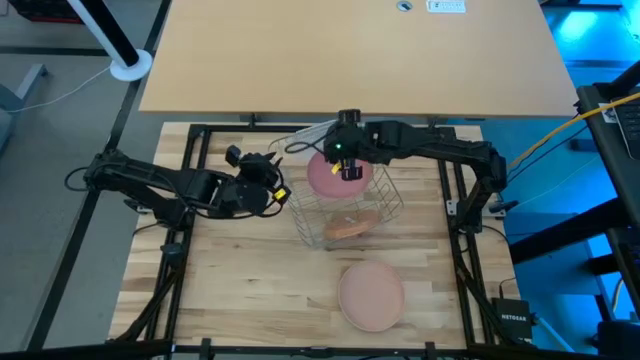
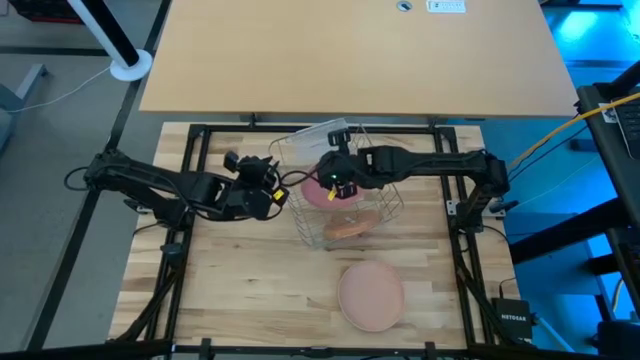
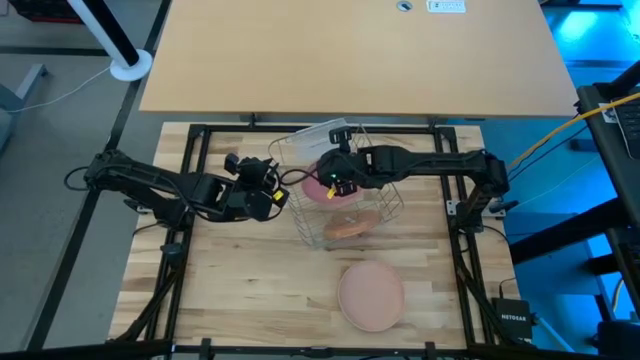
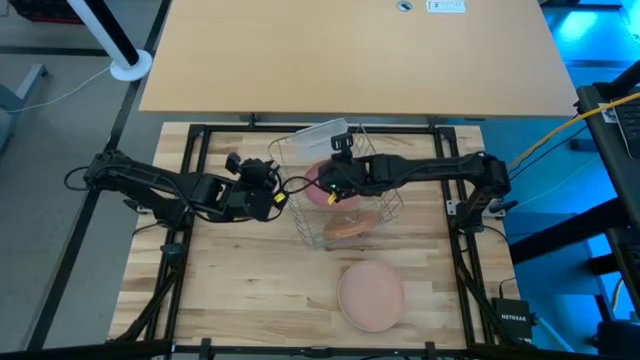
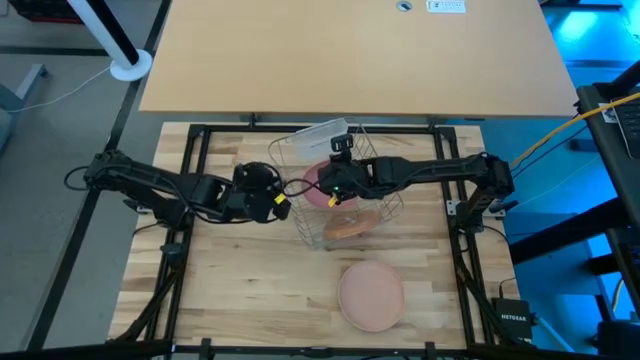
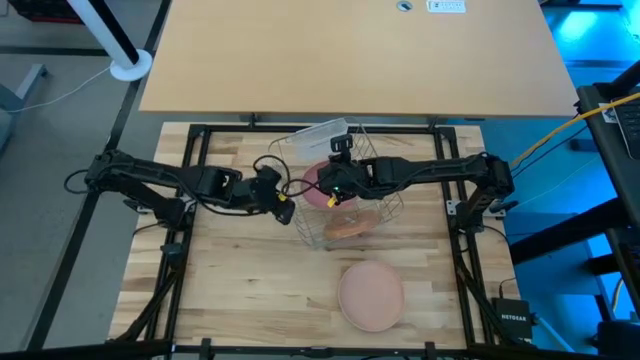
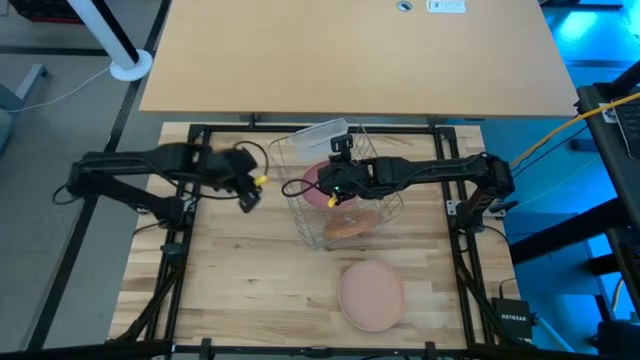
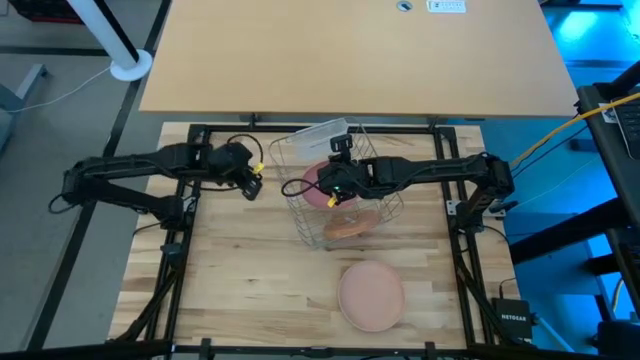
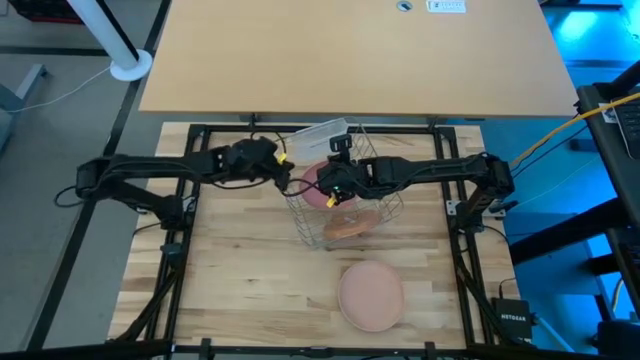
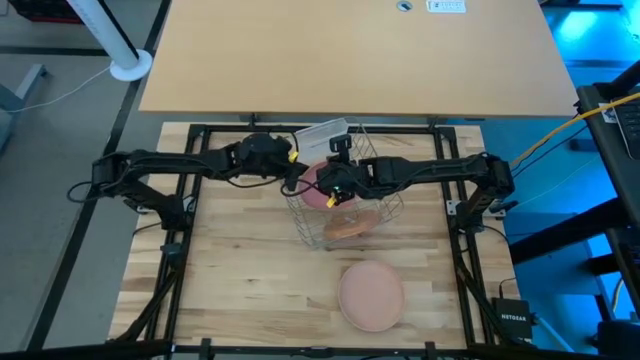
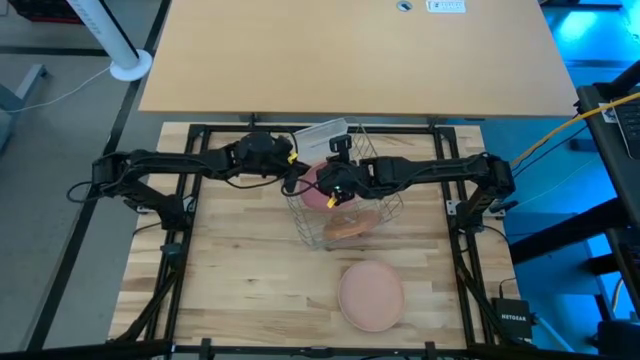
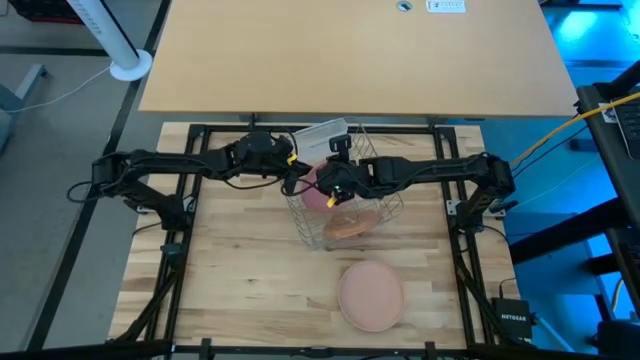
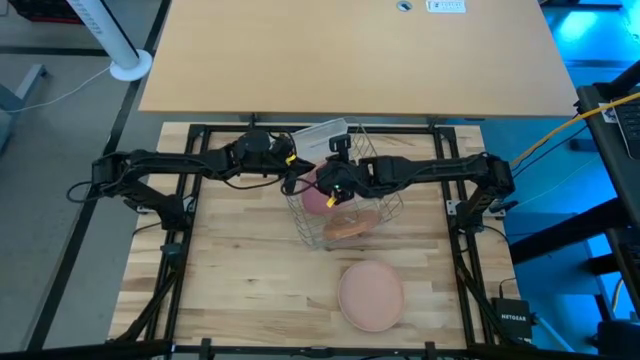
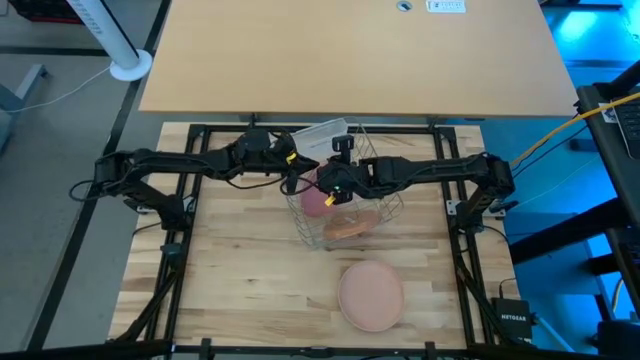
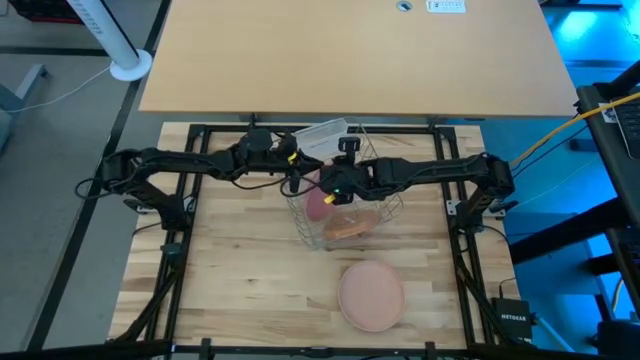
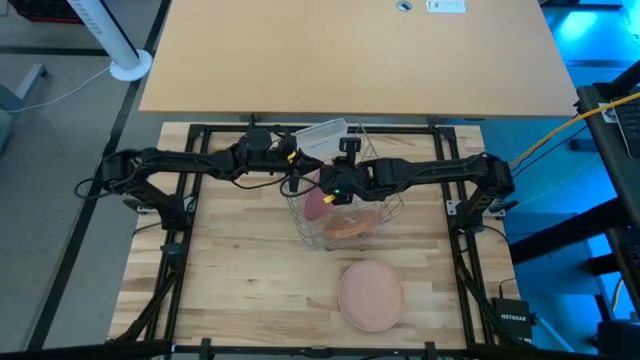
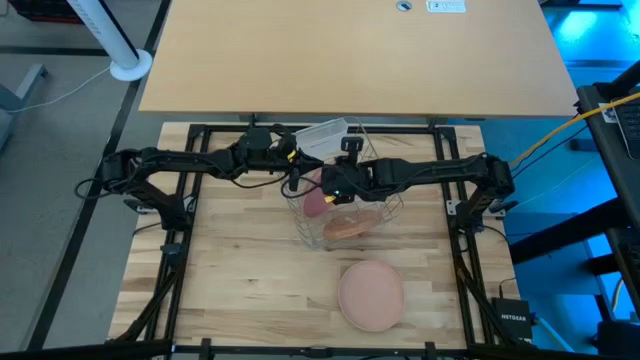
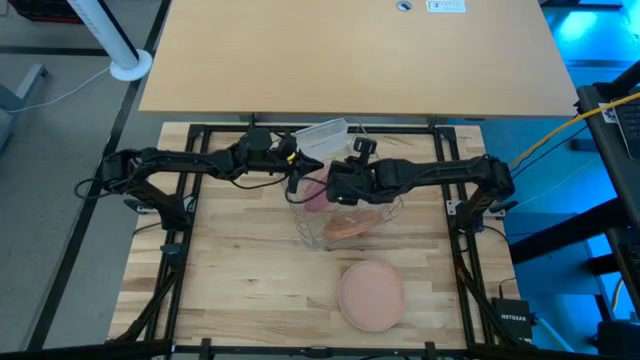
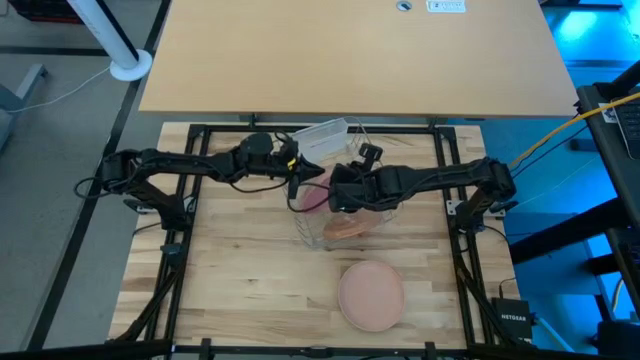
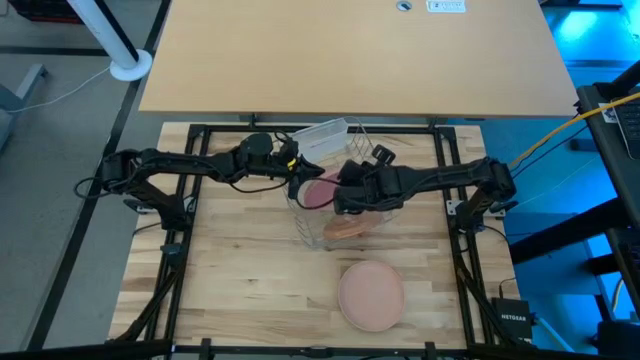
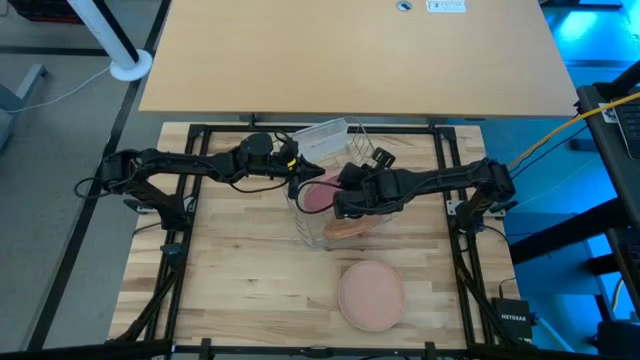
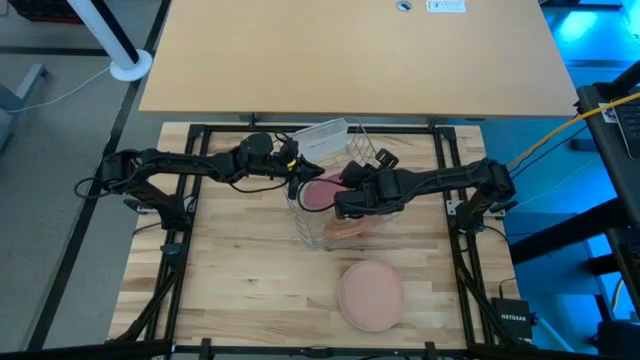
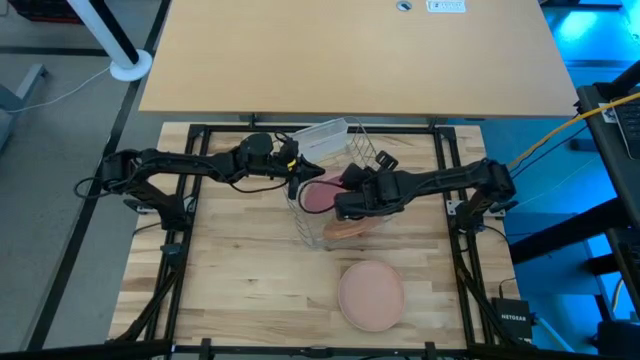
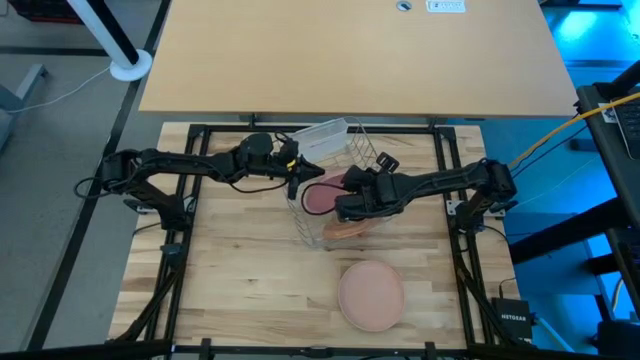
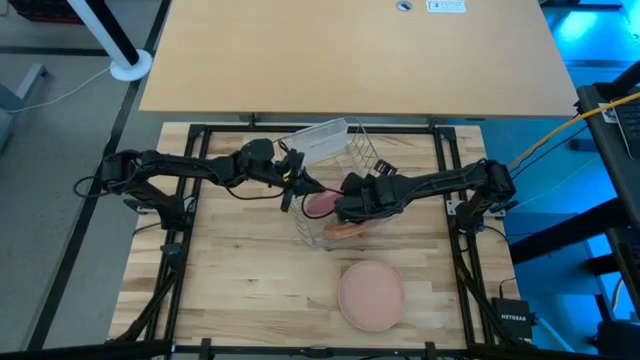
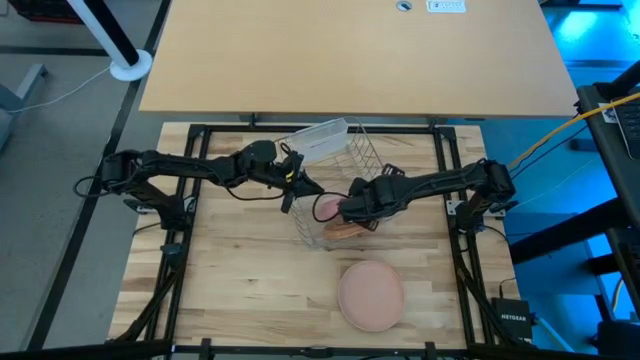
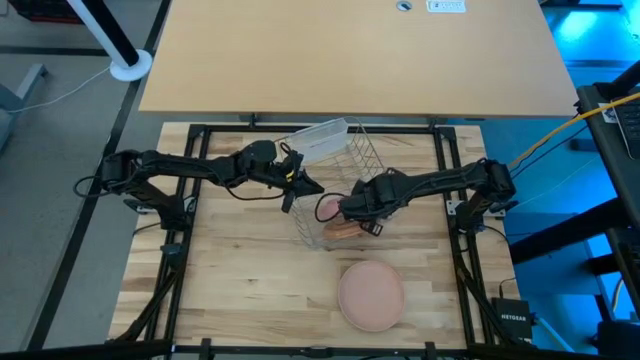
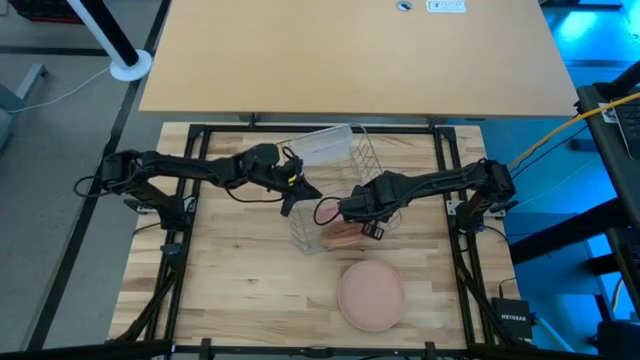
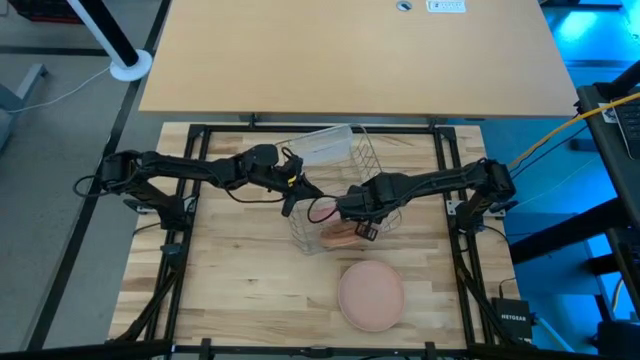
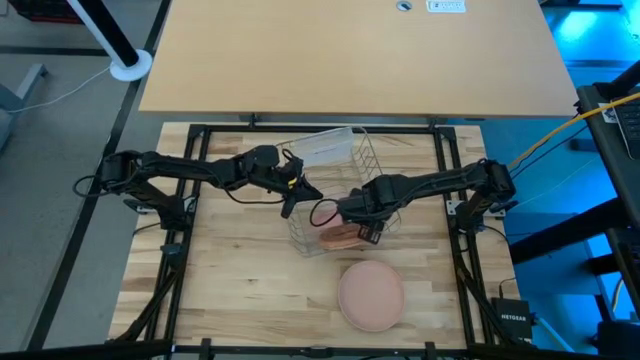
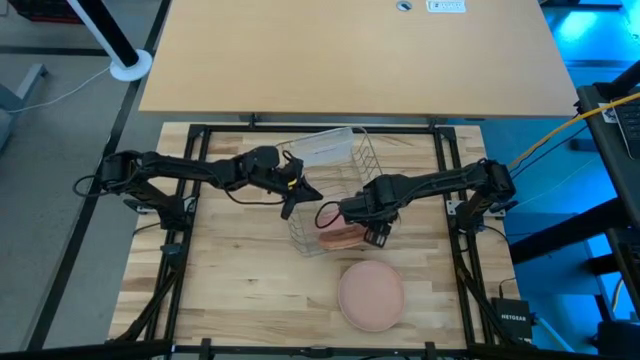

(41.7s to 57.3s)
Task: Sort dishes
Put the light pink plate in the dish rack

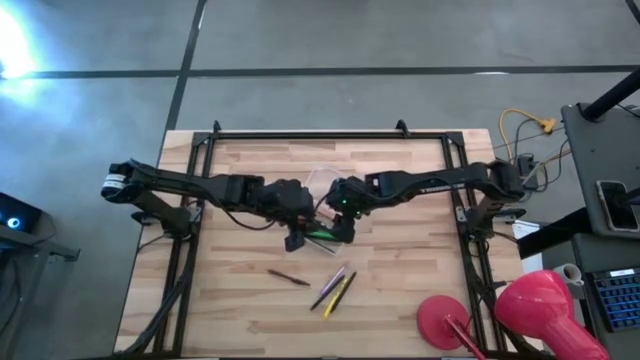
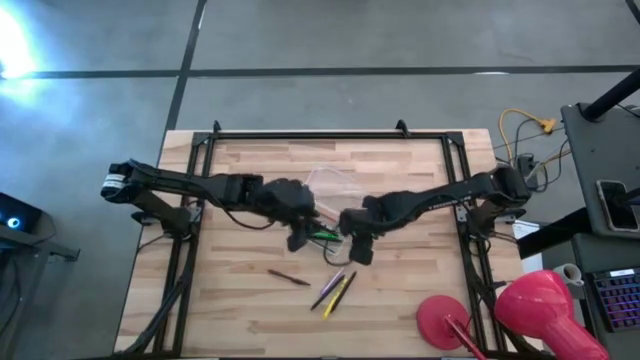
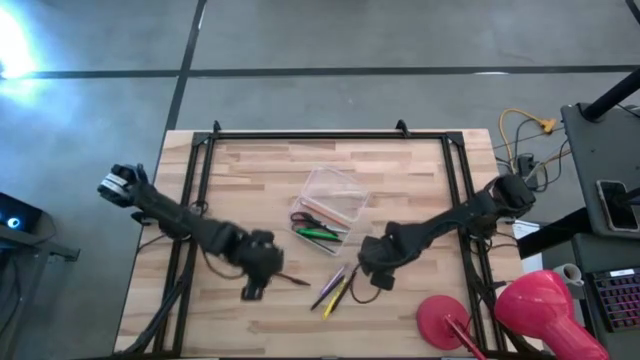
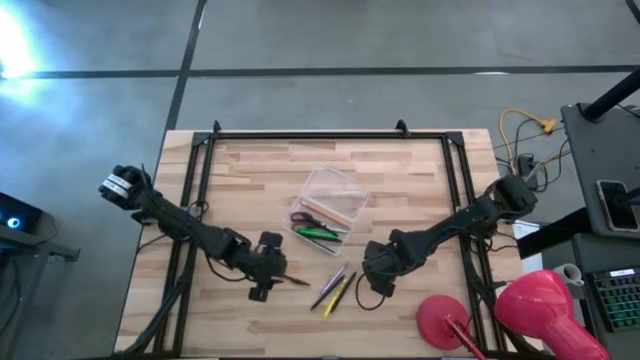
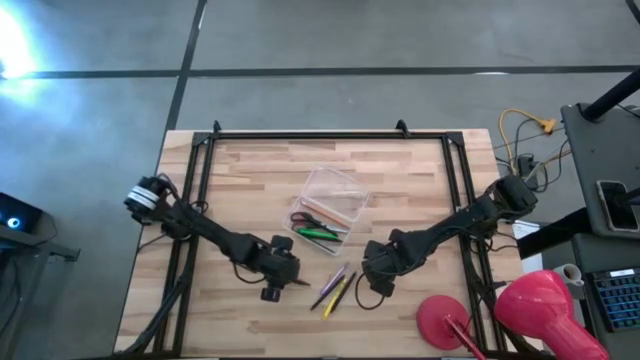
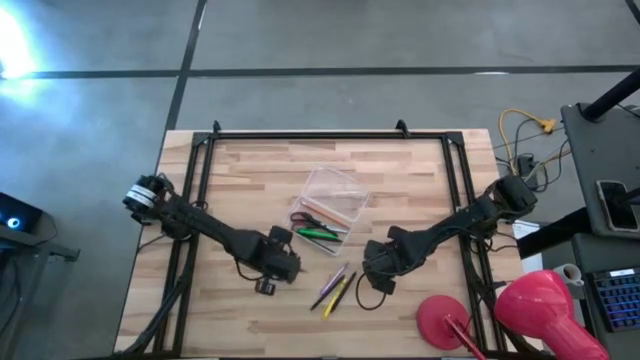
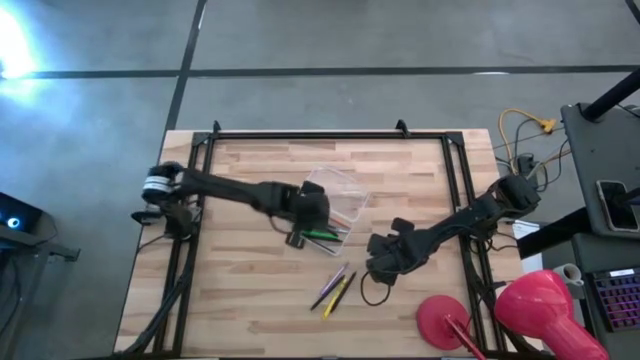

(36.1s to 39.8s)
Task: Pick & place school supplies into a supply box
Put the brown pen into the transparent case

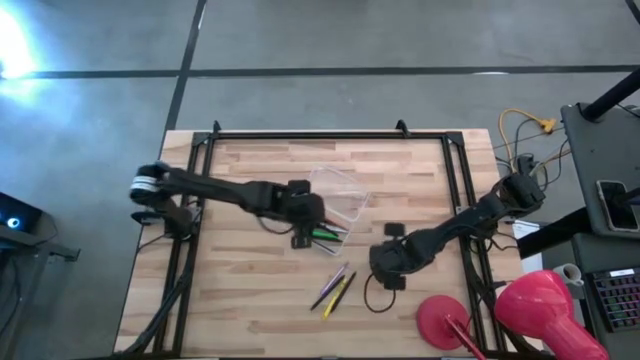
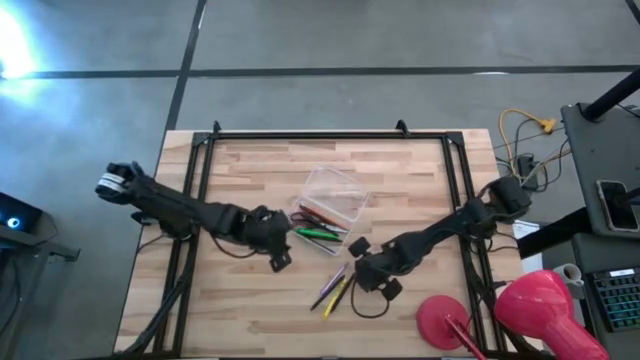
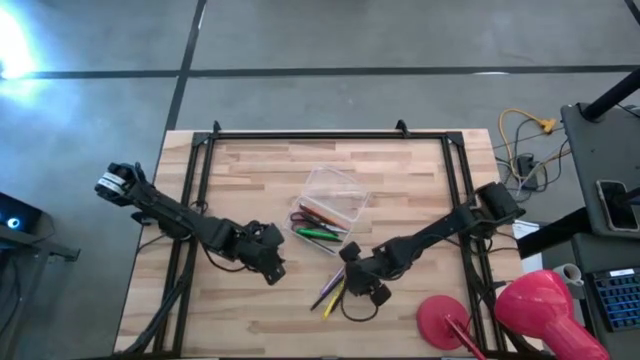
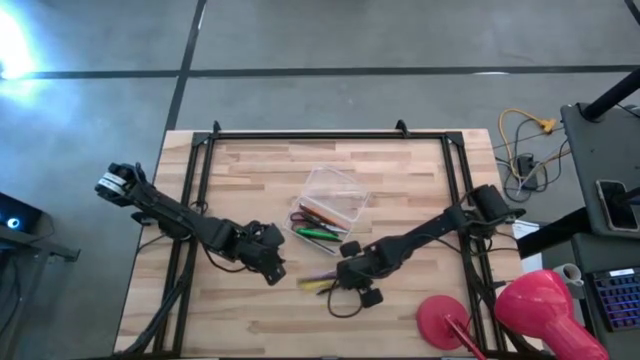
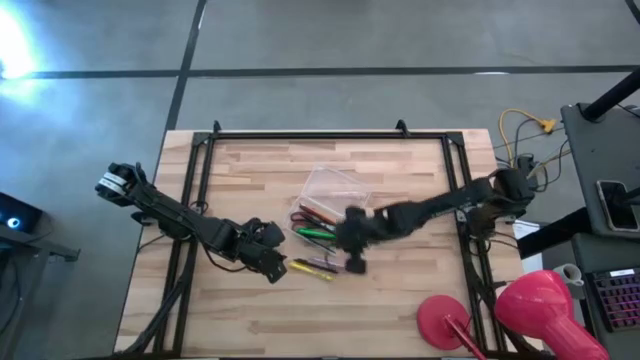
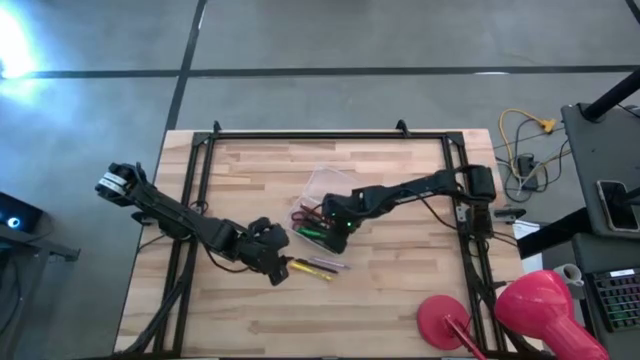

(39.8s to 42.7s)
Put the bottom black pen into the transparent case

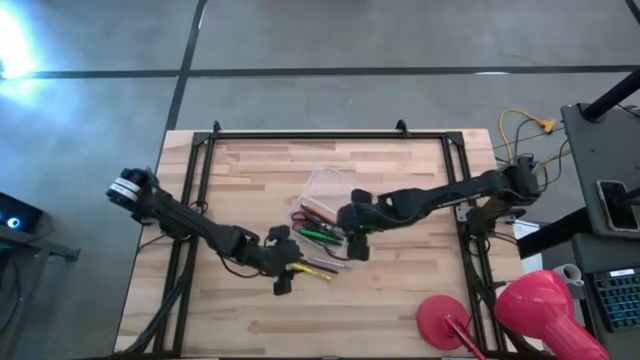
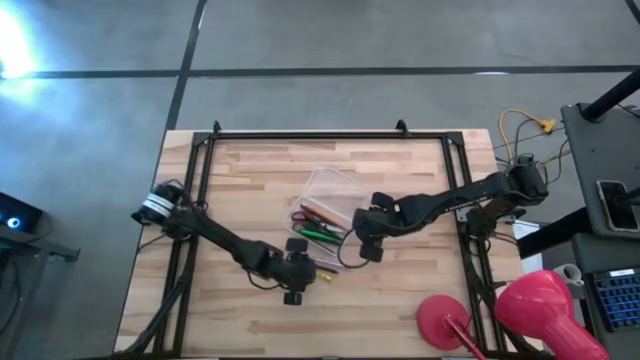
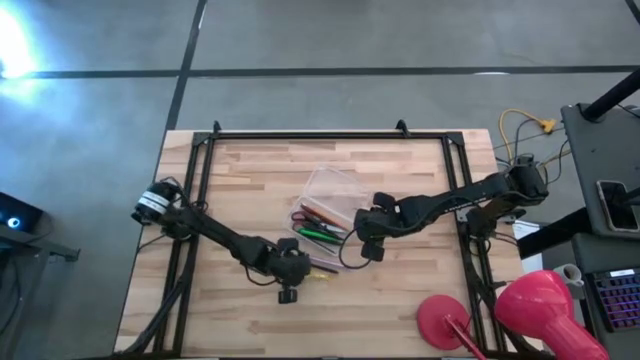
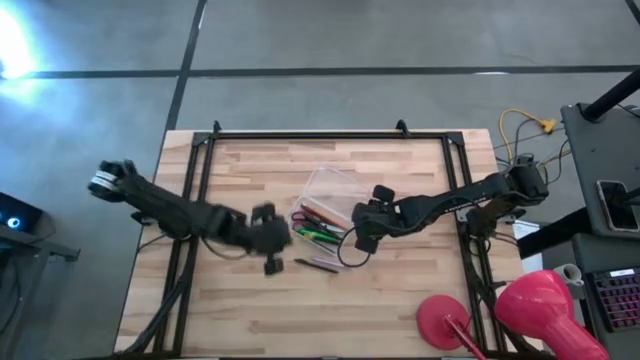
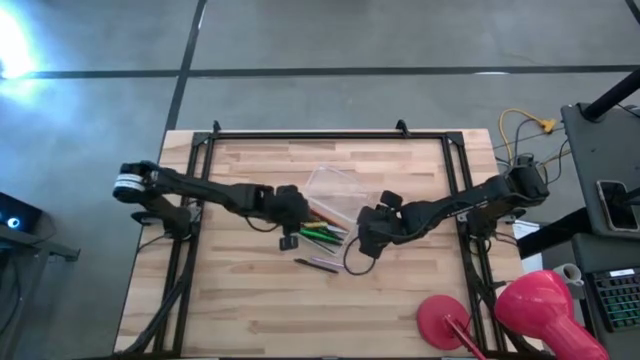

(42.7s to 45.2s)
Put the yellow pen into the transparent case
